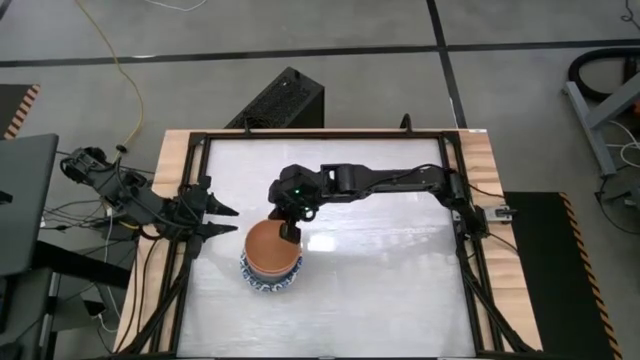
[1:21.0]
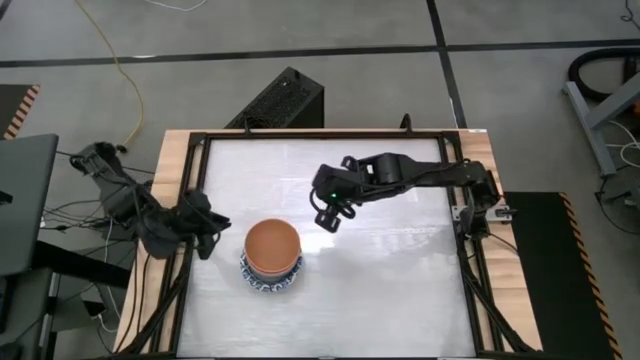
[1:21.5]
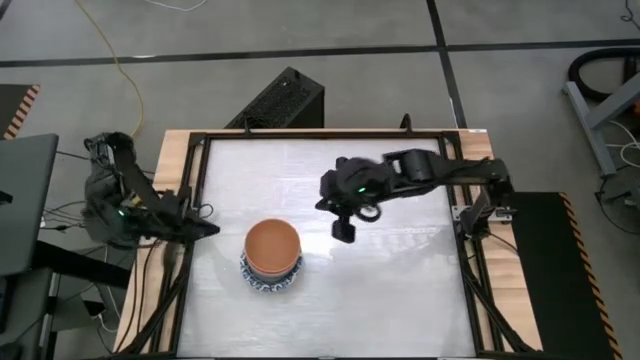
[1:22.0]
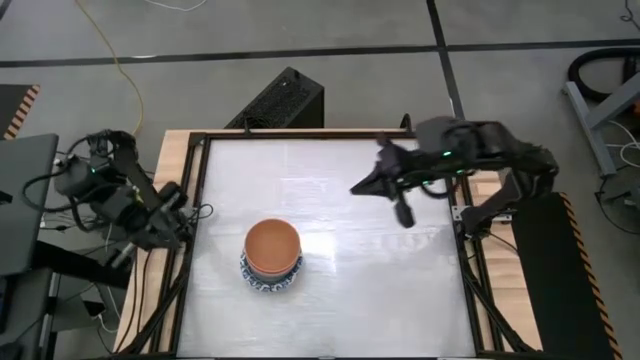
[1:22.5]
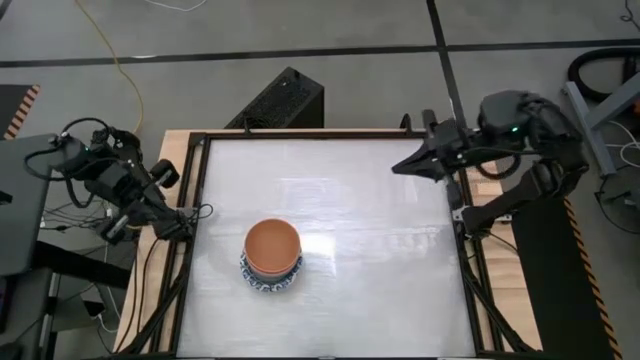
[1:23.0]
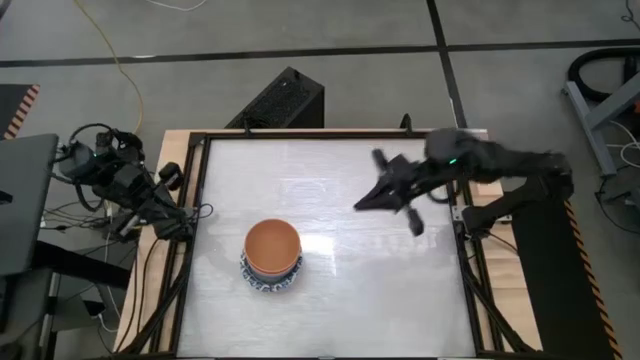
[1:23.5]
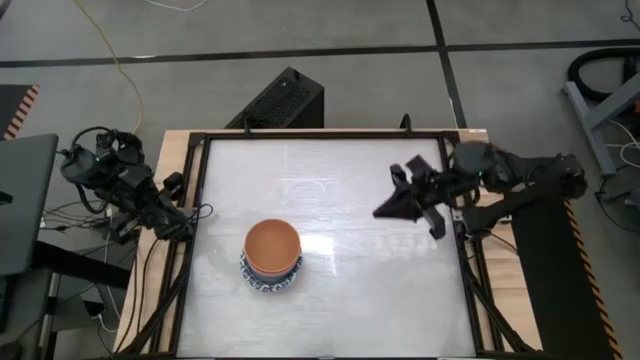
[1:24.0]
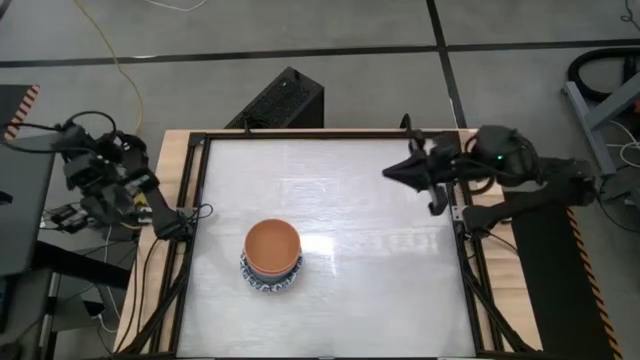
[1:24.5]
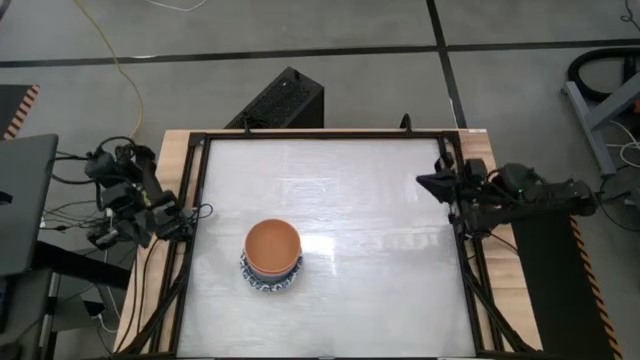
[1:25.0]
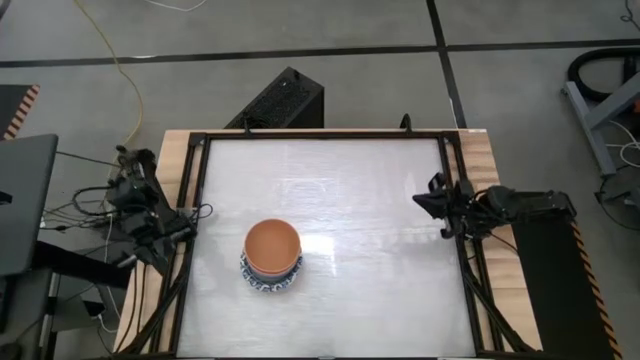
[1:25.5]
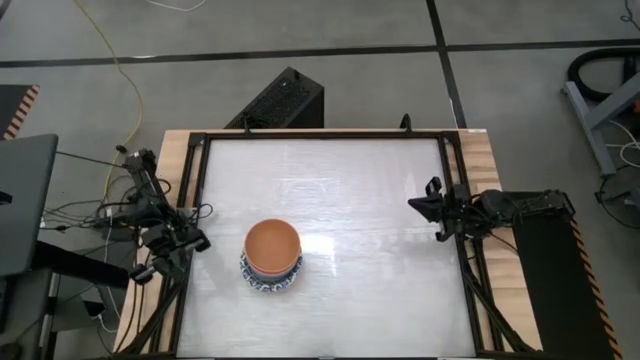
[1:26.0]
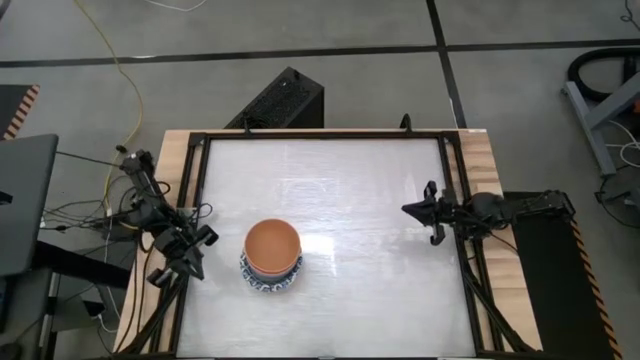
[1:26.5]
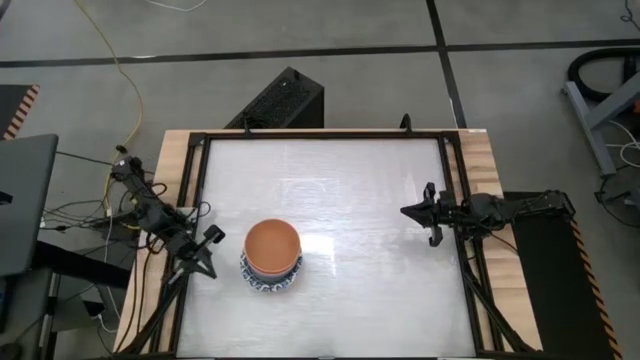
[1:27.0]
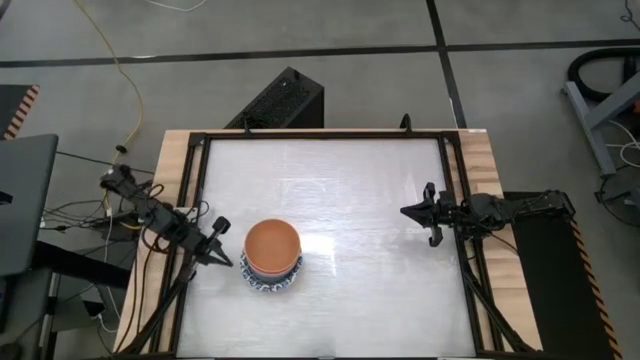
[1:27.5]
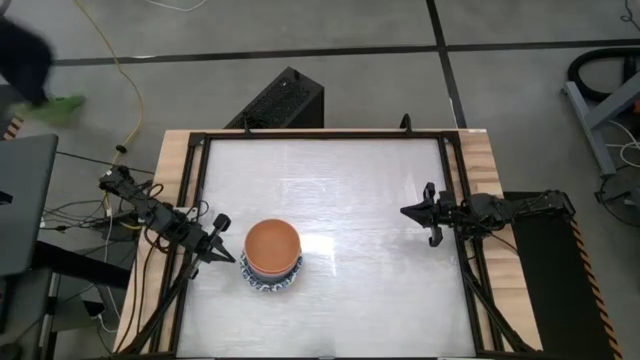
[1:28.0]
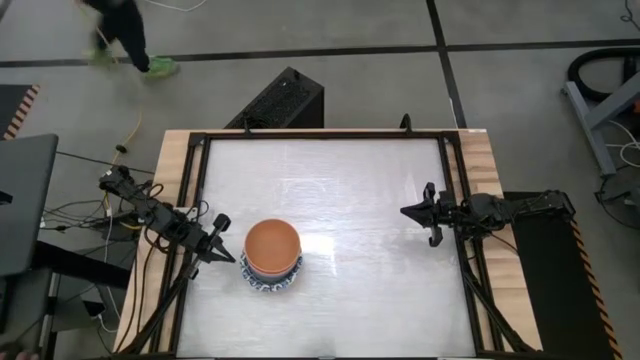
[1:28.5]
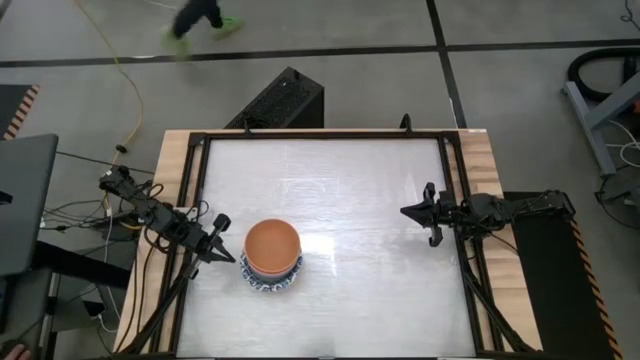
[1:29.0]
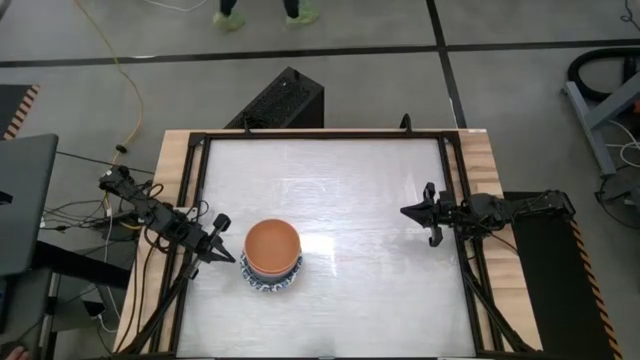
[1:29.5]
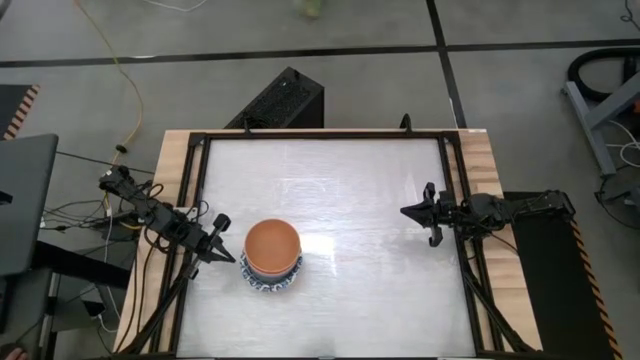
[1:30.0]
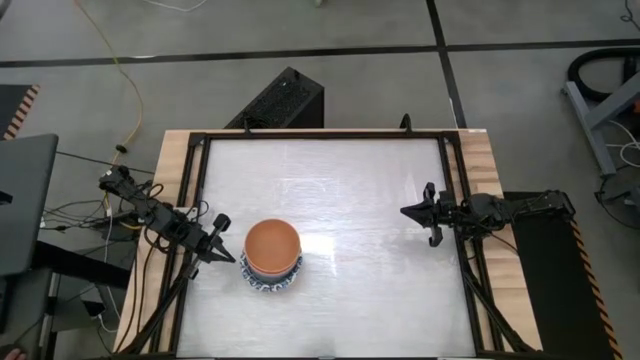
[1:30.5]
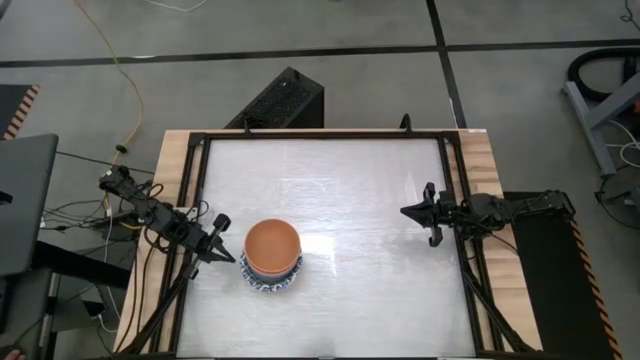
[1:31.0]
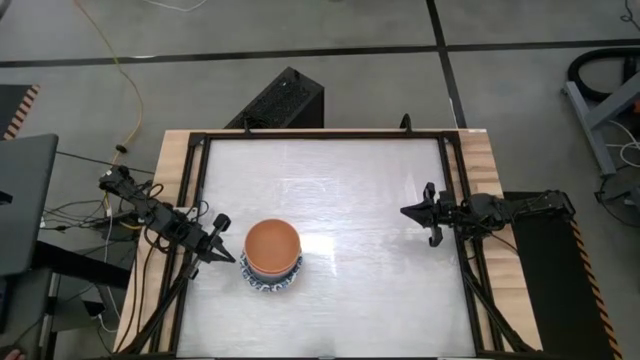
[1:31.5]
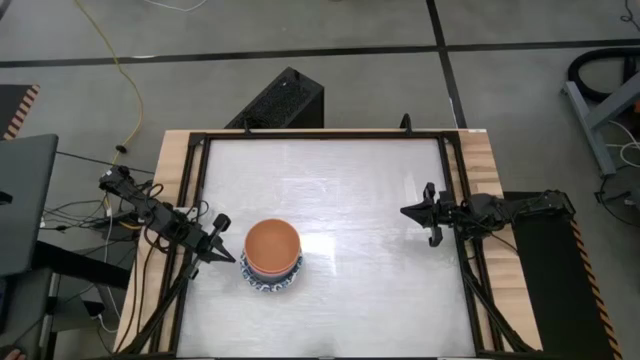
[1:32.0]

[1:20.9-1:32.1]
Return to Home Position

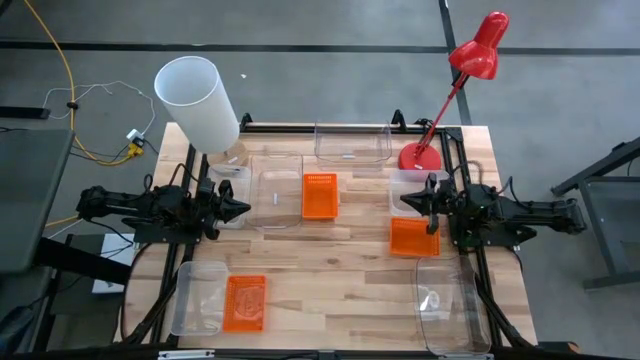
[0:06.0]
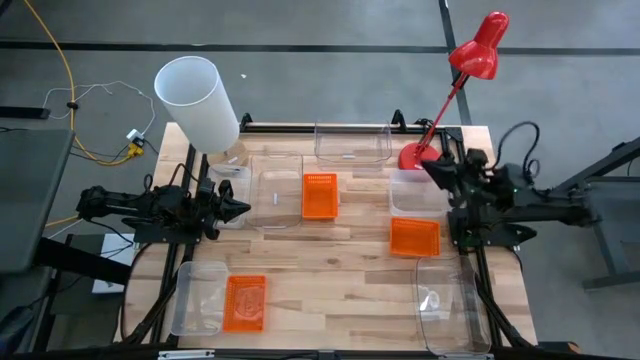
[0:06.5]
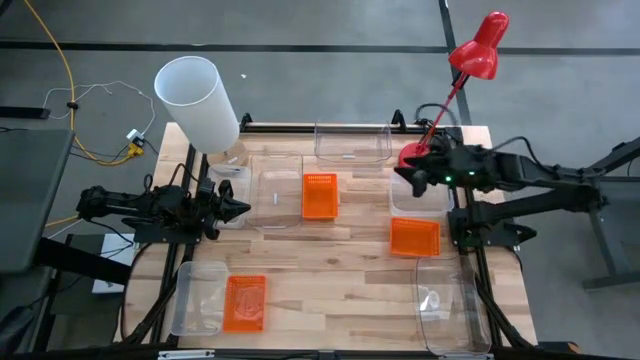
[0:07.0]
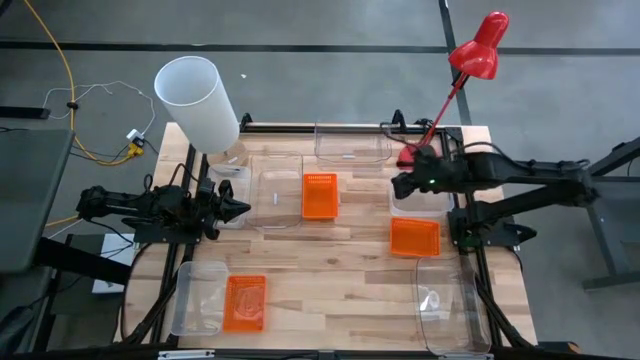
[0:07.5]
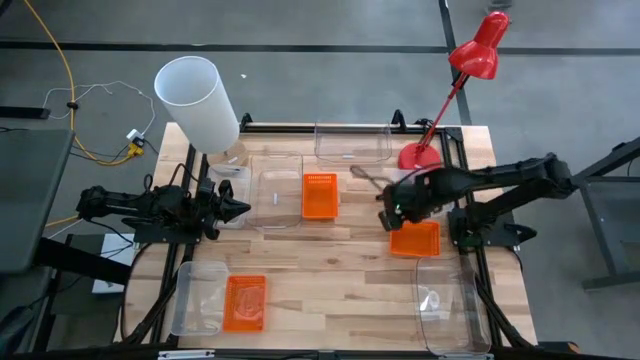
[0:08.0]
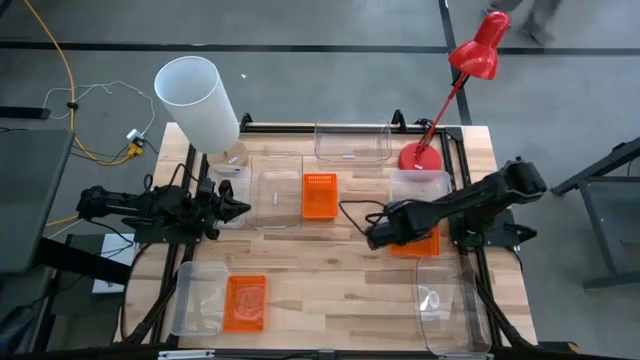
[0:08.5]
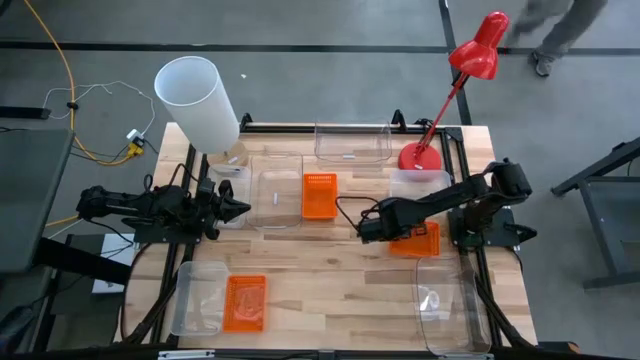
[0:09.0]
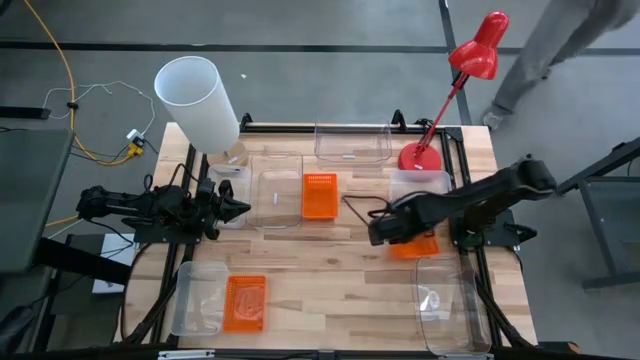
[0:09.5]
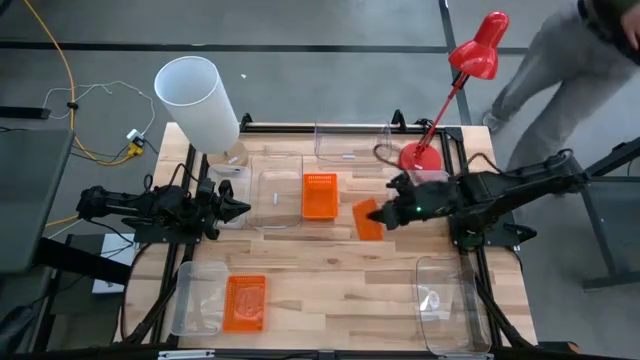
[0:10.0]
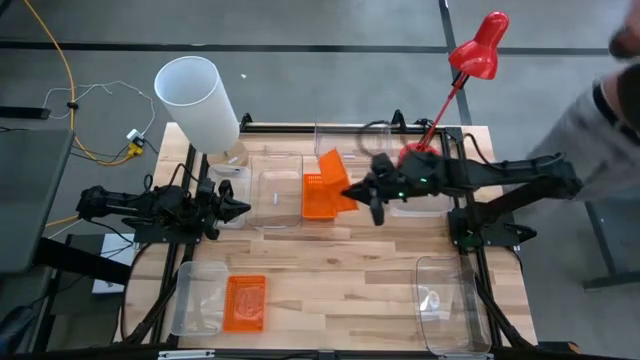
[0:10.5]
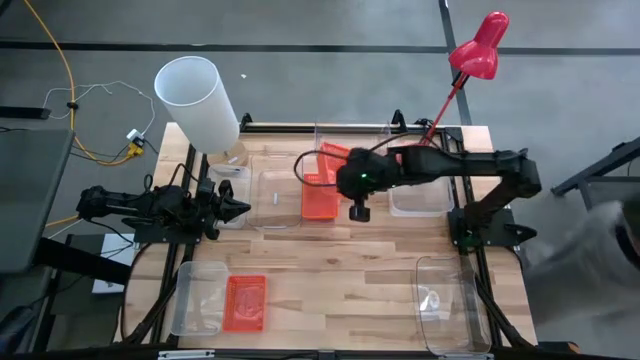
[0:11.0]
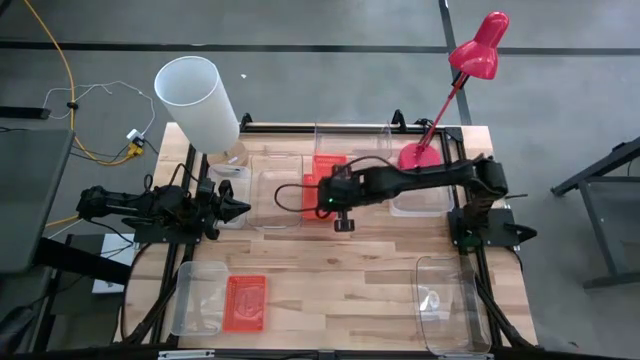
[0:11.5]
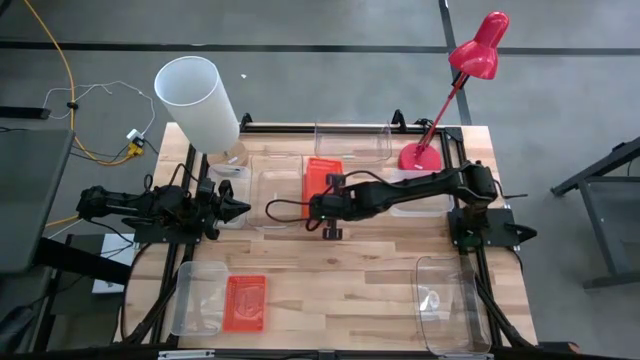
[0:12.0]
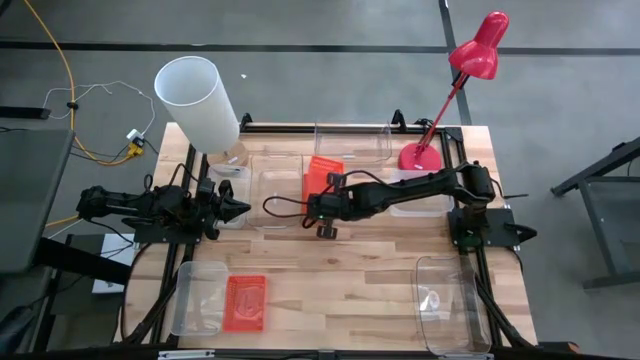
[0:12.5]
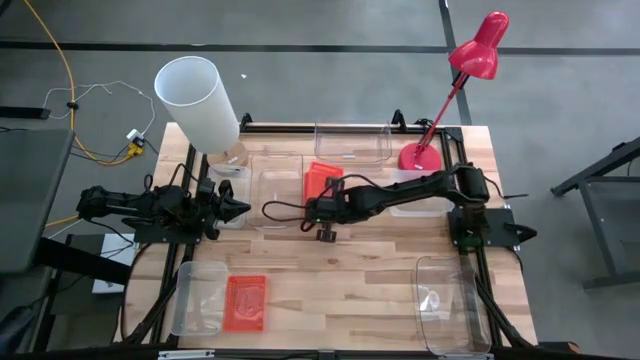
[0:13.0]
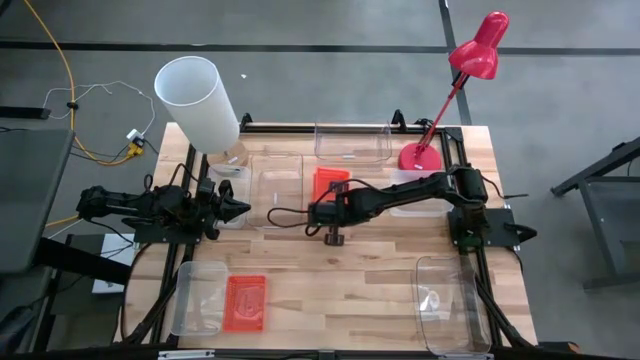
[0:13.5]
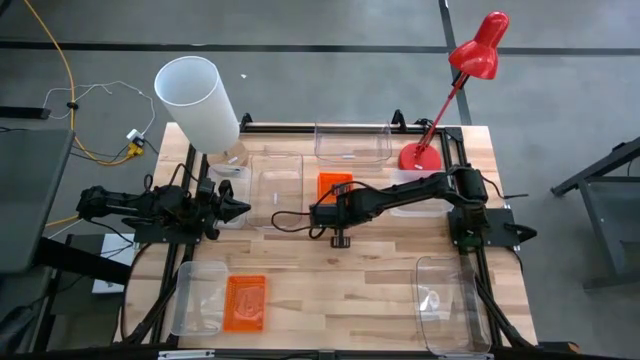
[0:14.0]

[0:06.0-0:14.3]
Stack the middle orange bin on top of the top orange bin
